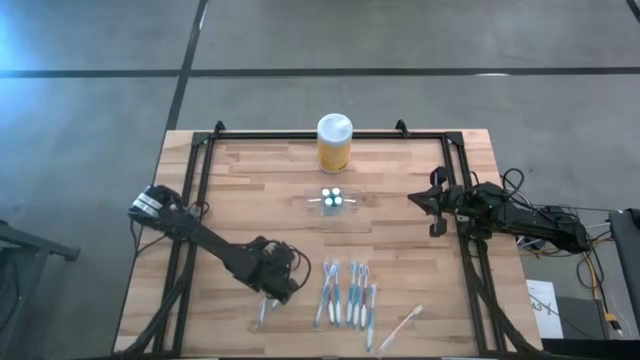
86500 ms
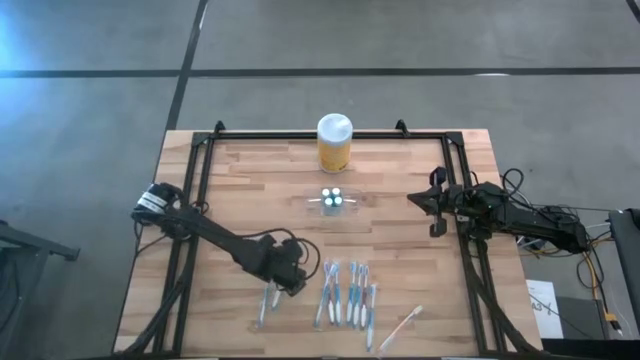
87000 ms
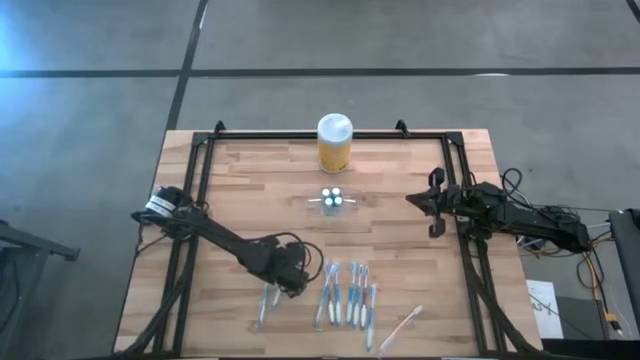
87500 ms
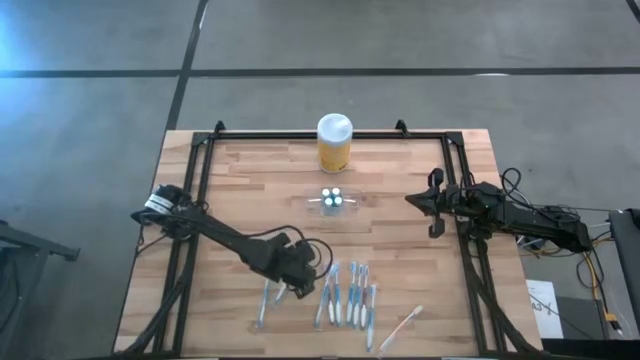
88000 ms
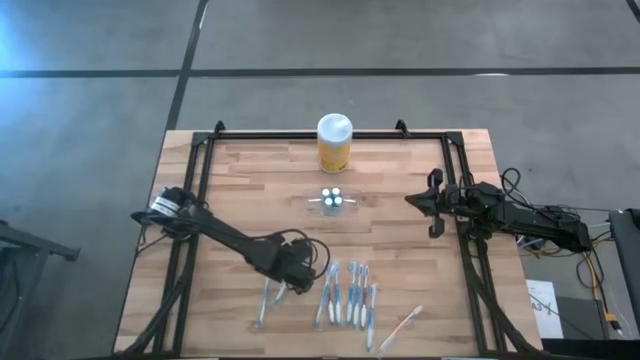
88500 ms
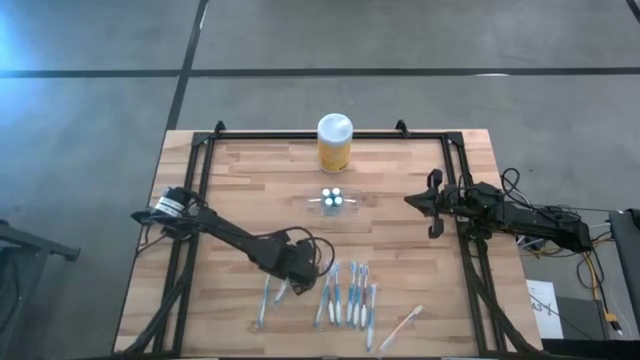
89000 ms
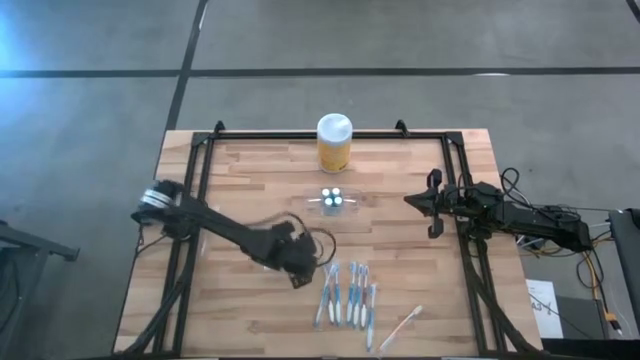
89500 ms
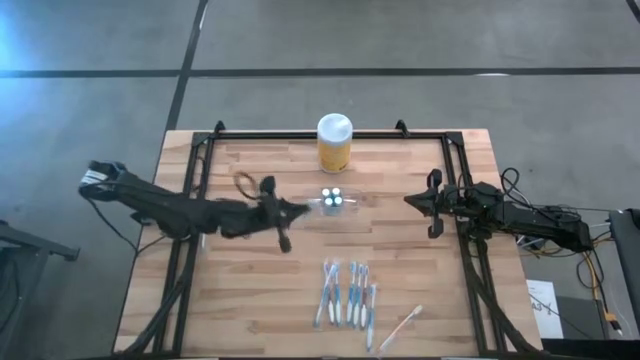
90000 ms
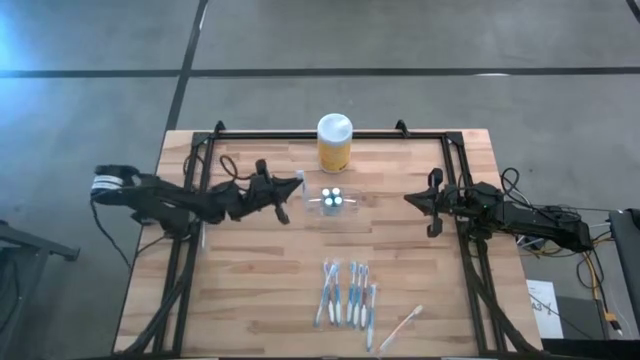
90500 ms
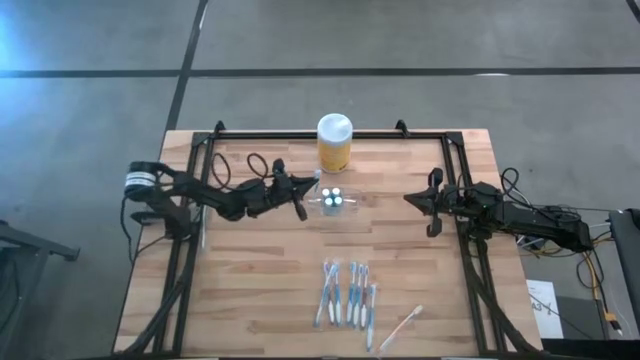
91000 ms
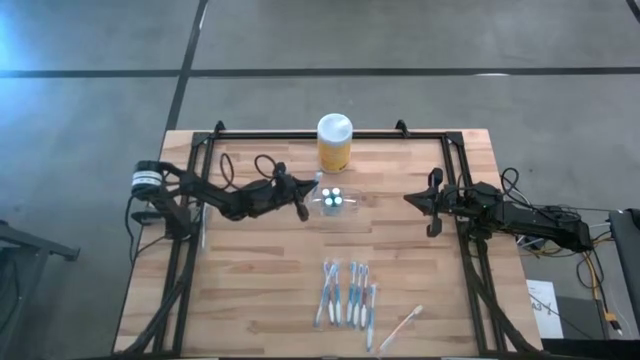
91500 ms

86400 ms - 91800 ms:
Task: Pick & Place toothbrushing station
Put the blue toothbrush into the left of the transparent organizer

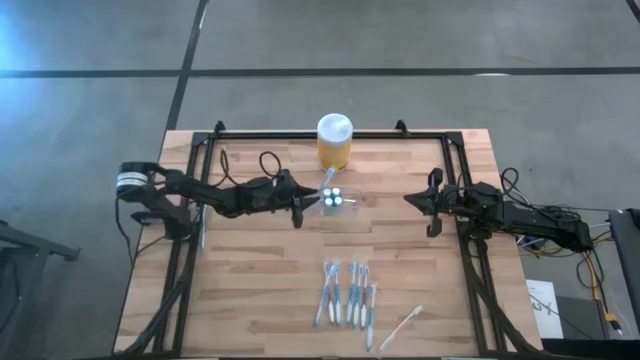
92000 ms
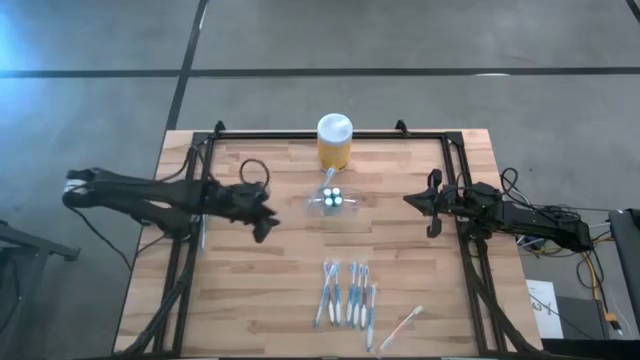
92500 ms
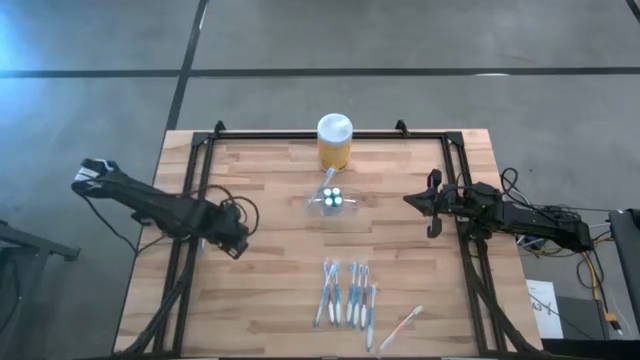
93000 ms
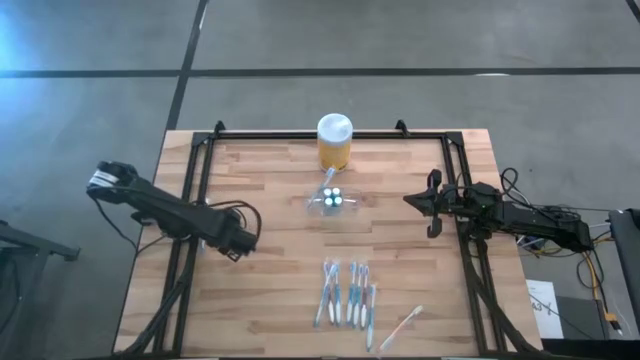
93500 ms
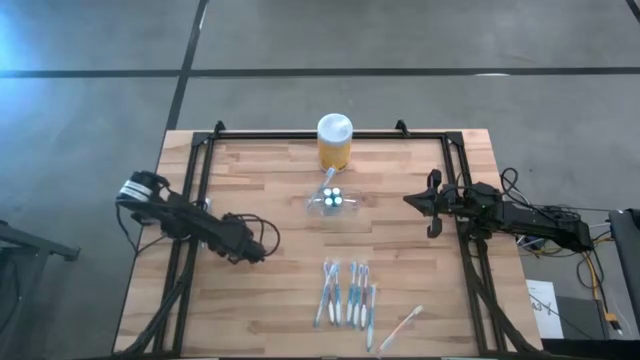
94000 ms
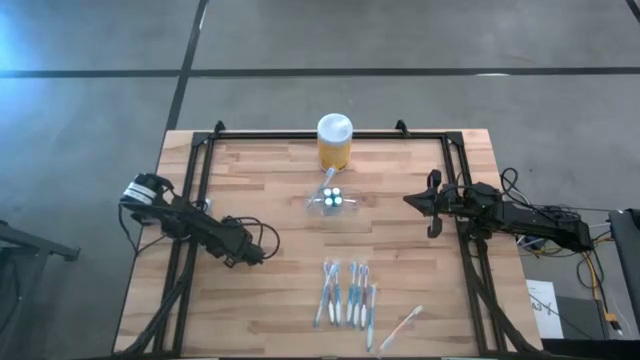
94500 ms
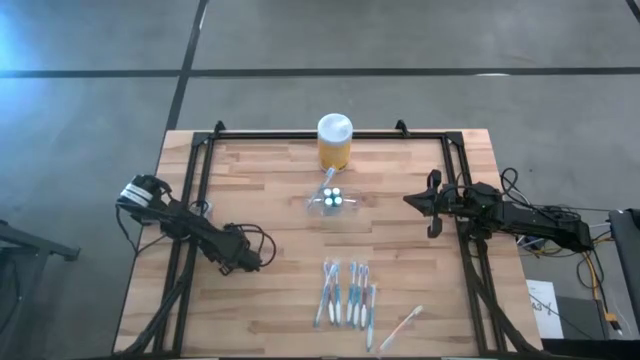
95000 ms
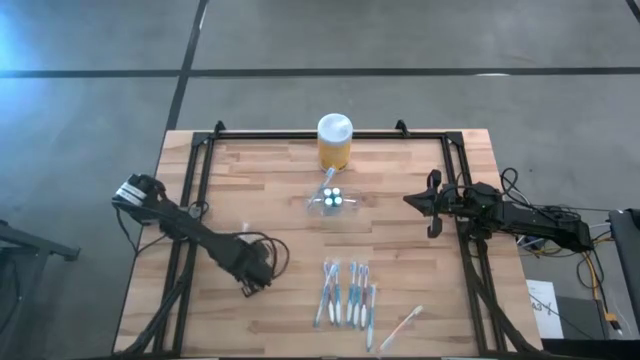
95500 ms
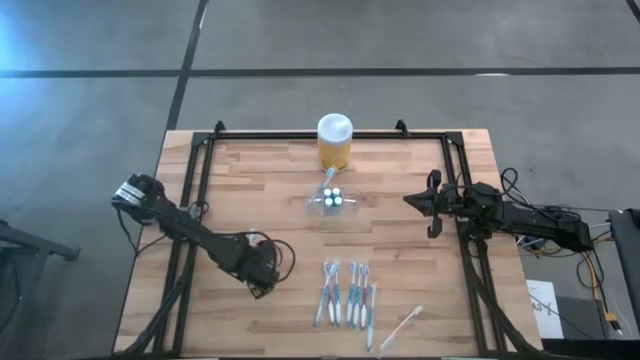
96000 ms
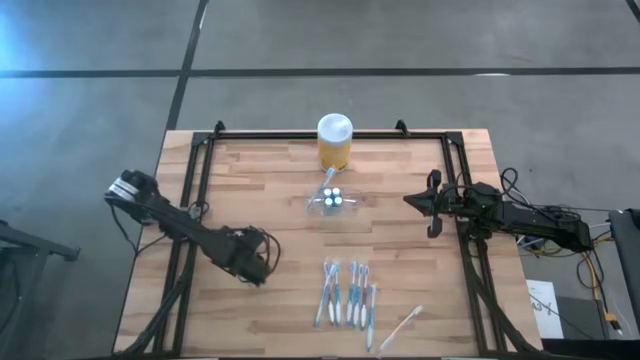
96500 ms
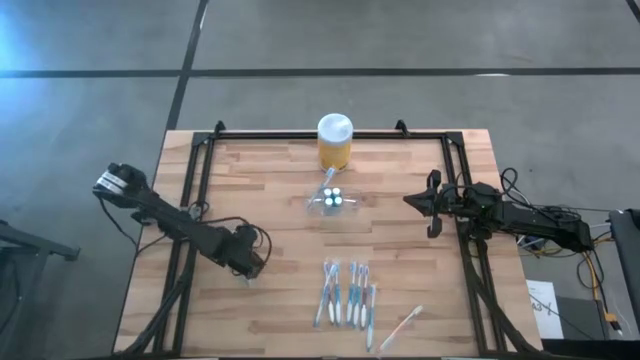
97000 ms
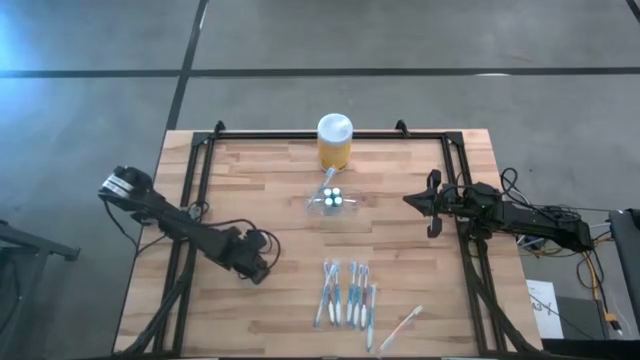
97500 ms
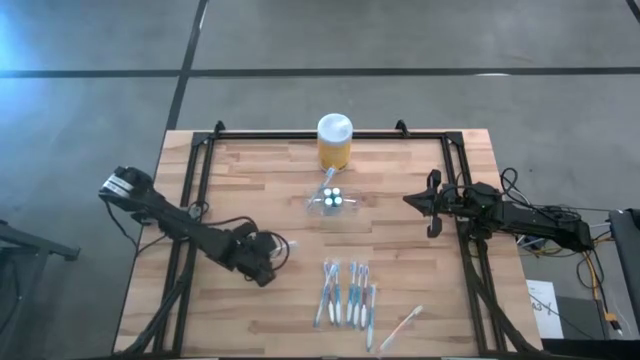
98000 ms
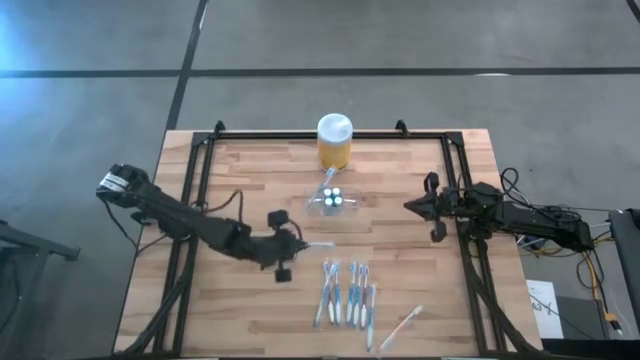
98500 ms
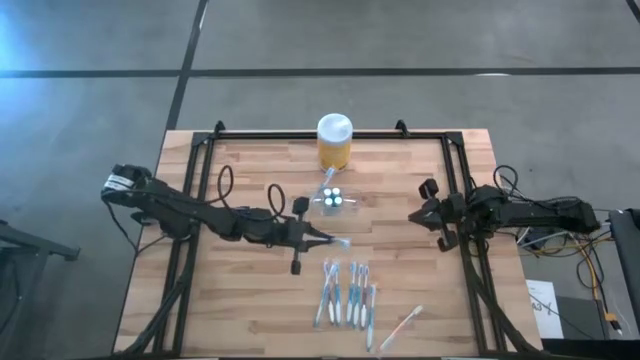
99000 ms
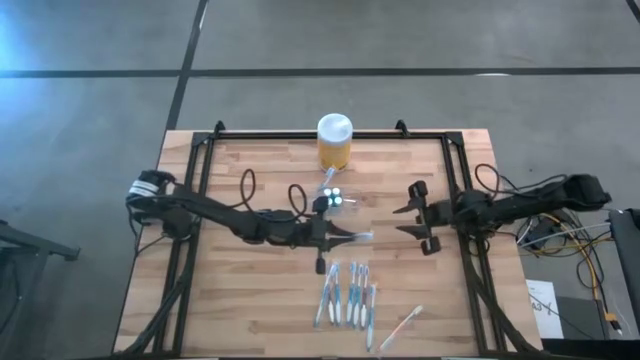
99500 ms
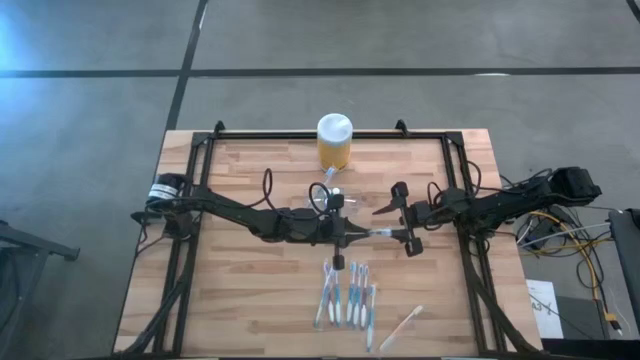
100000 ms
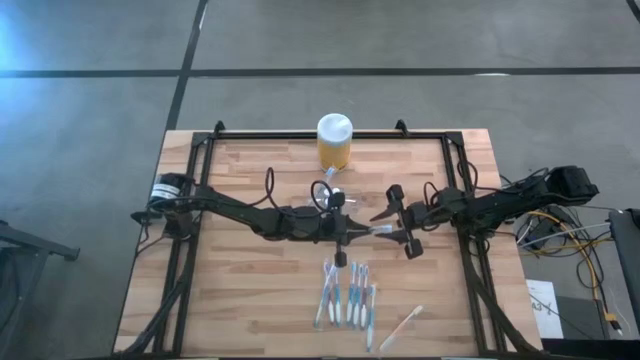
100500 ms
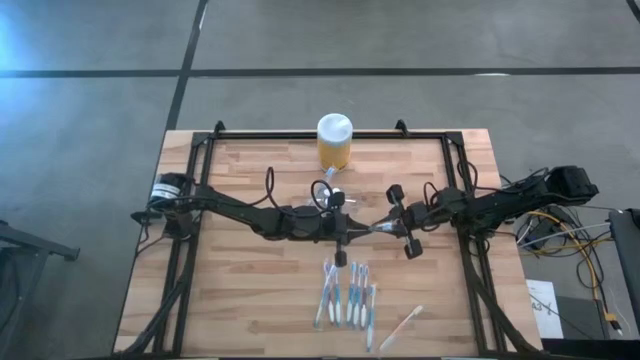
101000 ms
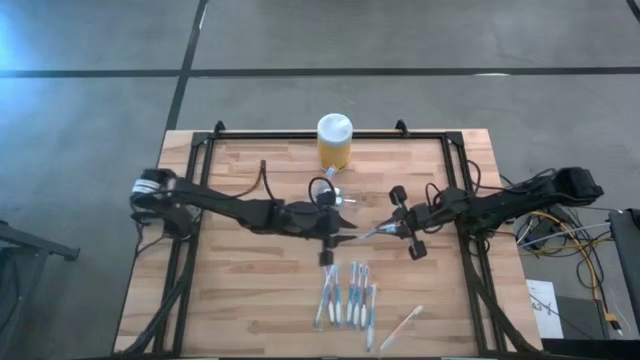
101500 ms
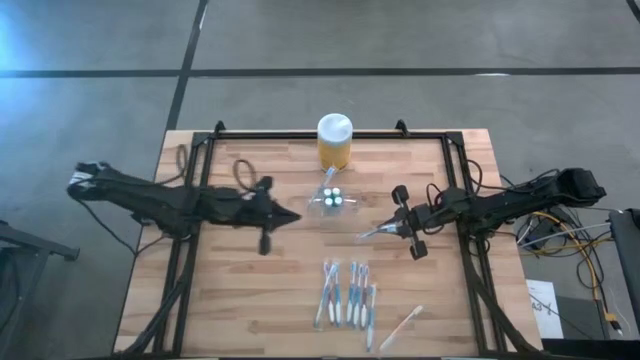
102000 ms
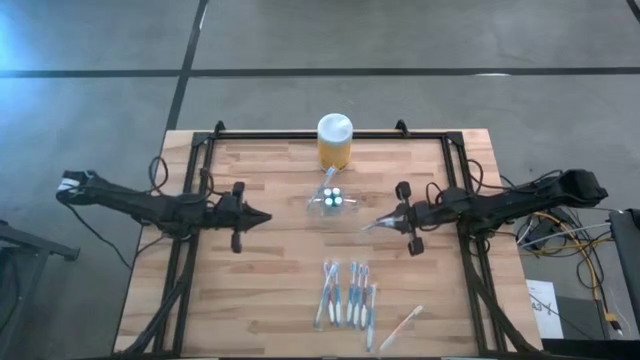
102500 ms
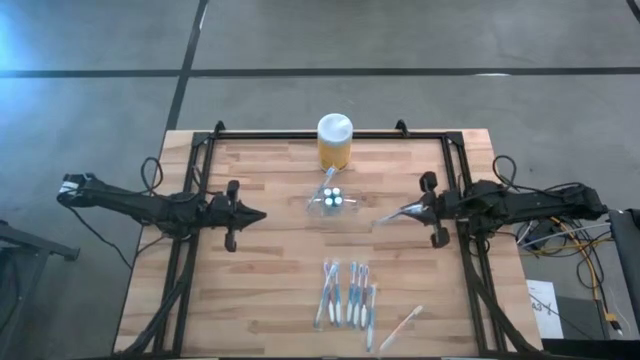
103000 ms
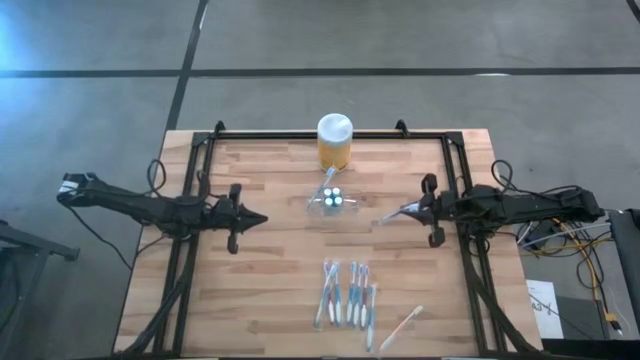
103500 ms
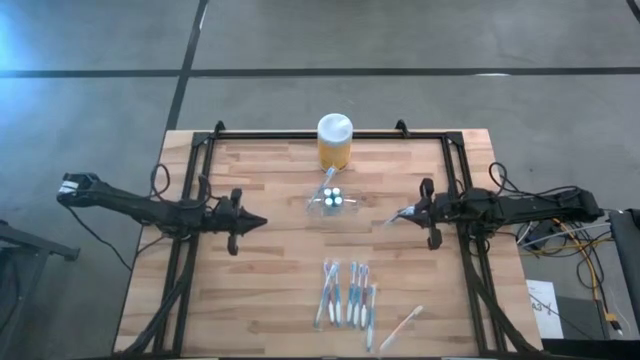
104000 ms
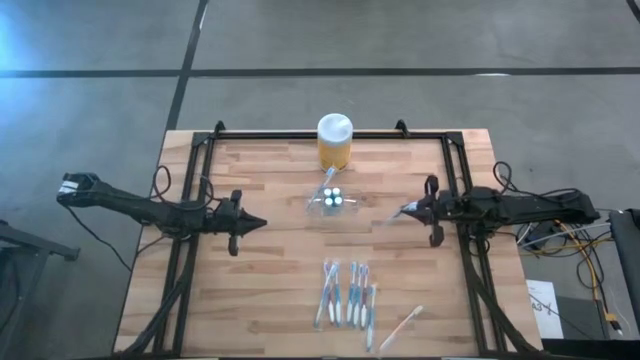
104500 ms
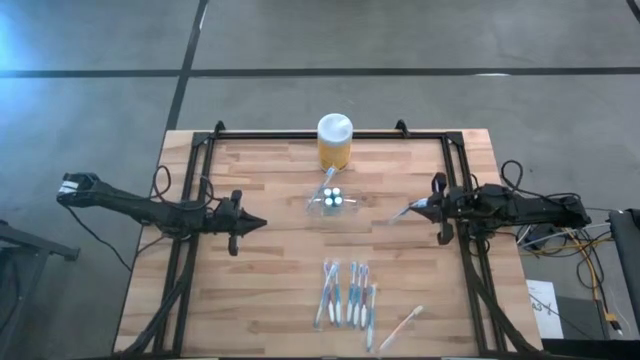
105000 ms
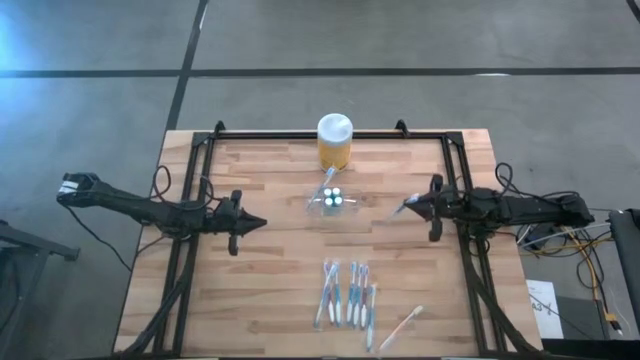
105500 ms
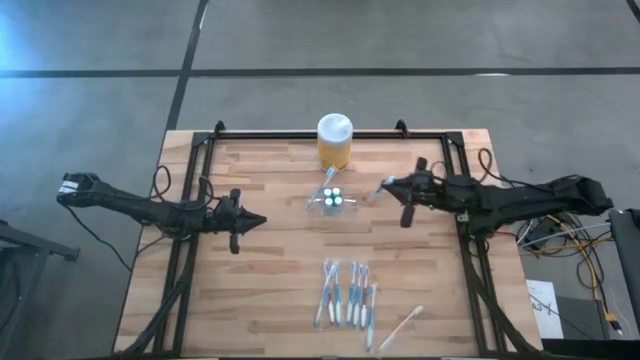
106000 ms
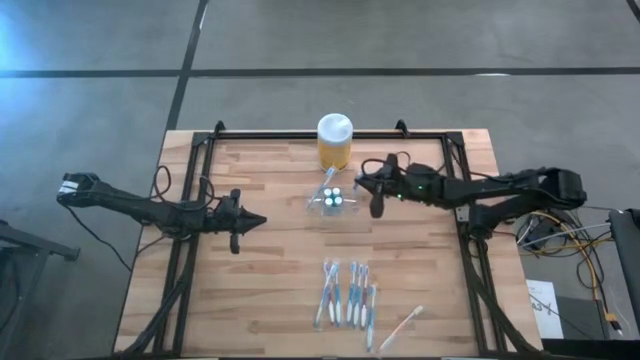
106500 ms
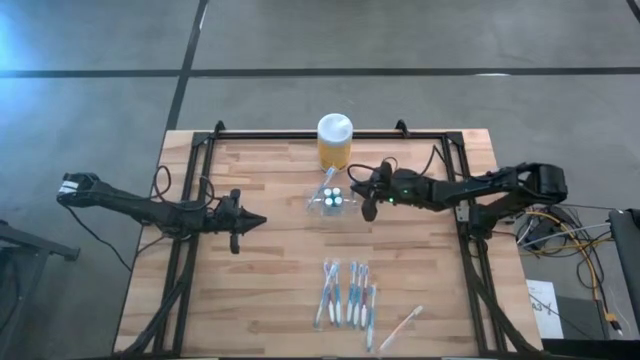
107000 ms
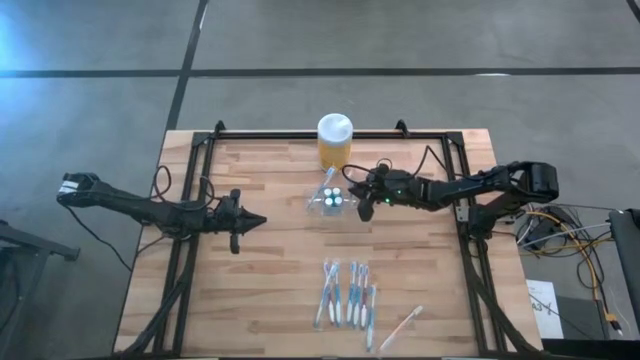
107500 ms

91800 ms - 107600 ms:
Put the blue toothbrush into the right of the transparent organizer
